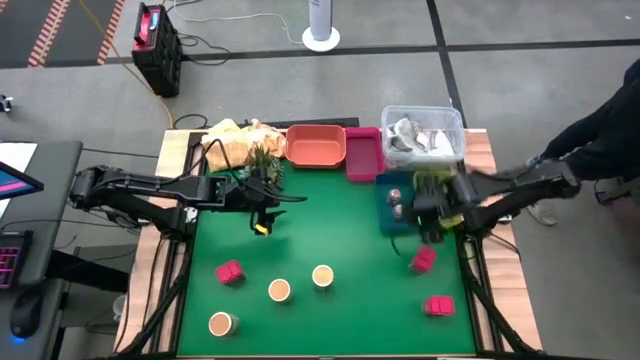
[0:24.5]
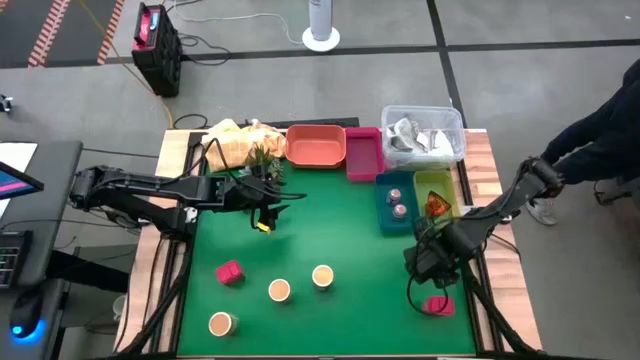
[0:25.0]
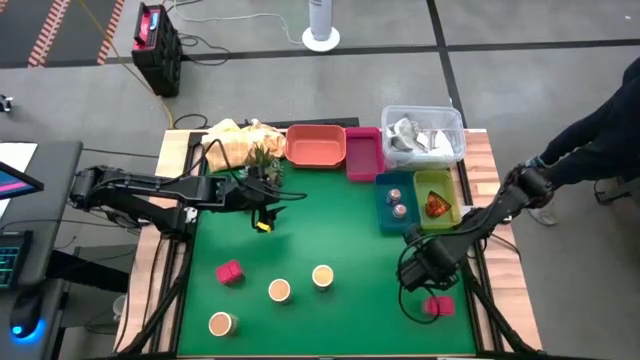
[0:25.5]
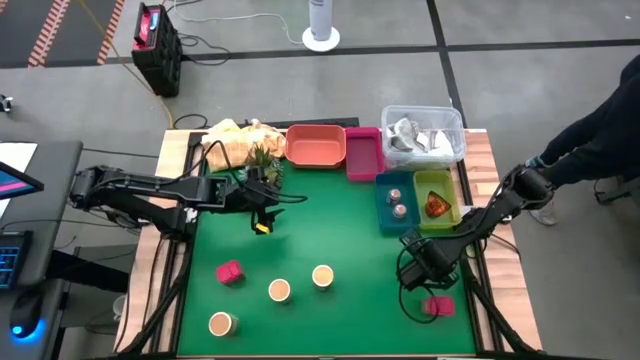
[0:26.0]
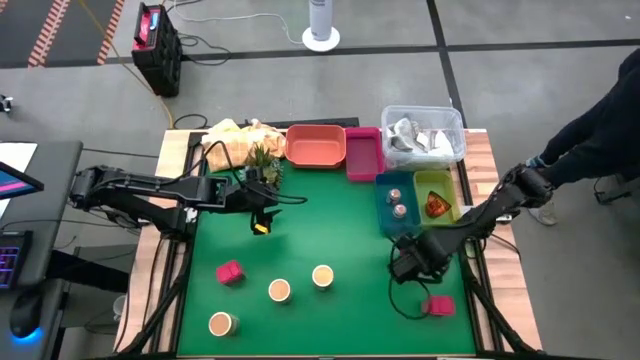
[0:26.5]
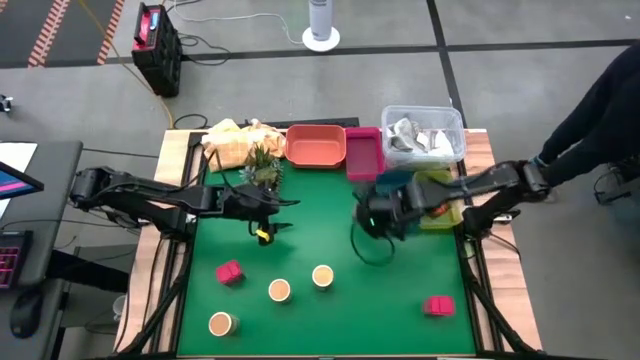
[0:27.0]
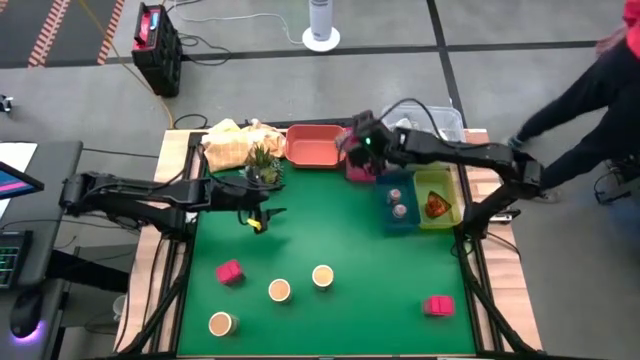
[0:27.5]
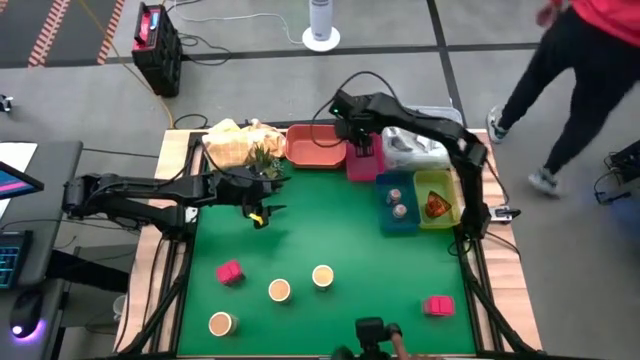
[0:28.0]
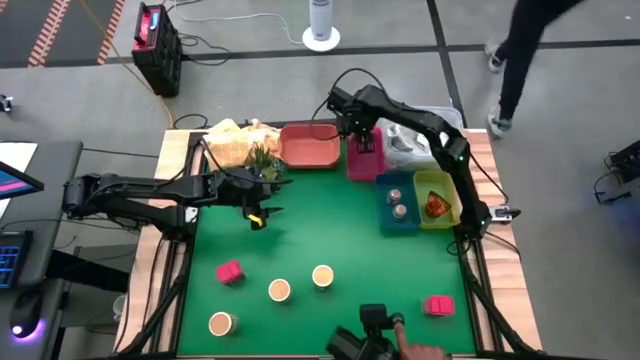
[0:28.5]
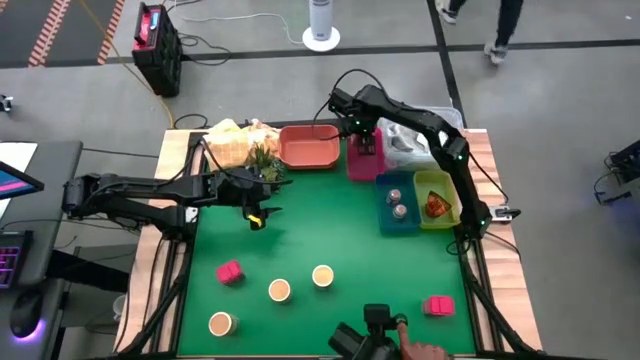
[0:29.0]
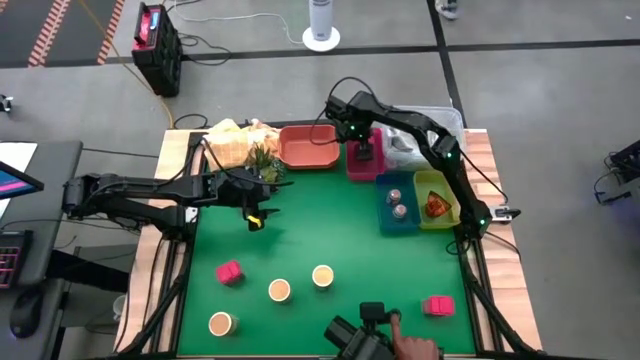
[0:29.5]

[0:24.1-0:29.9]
Task: Sort spices by type
Put the red seasoning can into the pink bin

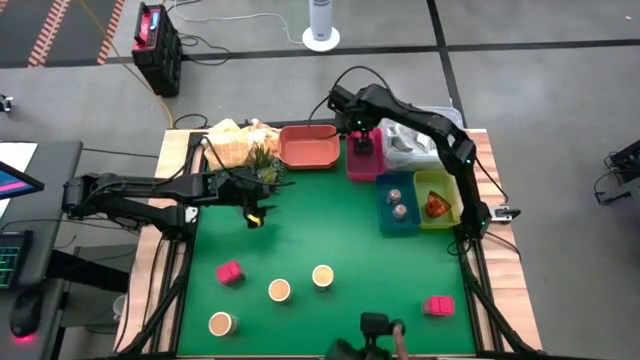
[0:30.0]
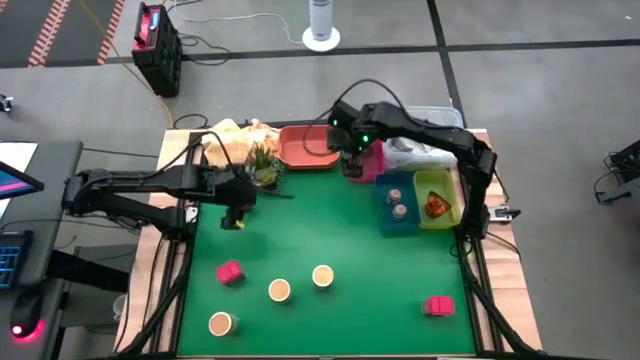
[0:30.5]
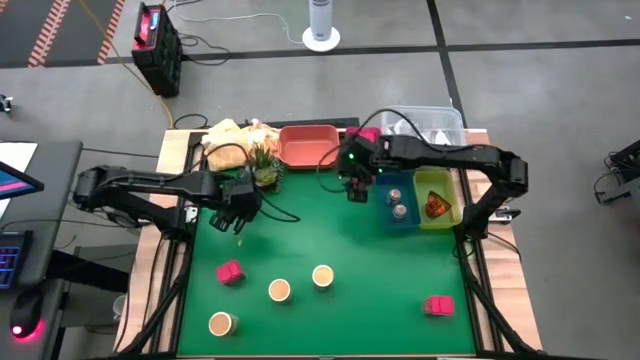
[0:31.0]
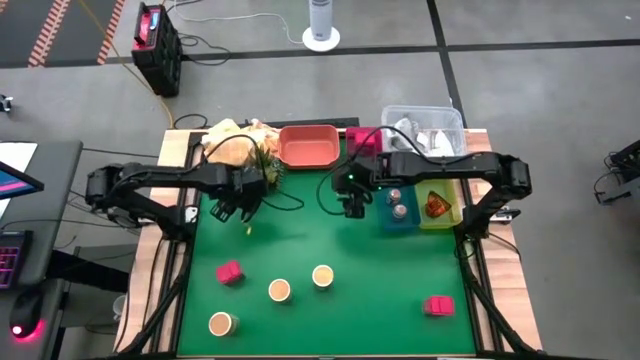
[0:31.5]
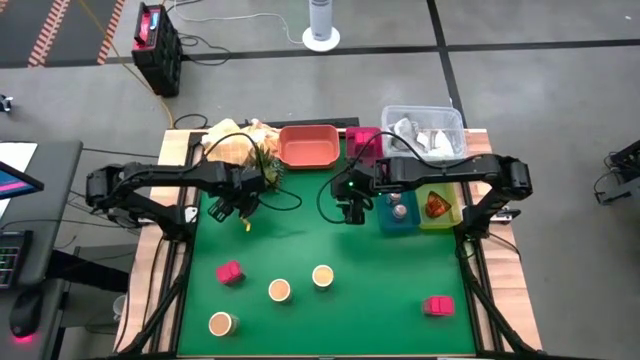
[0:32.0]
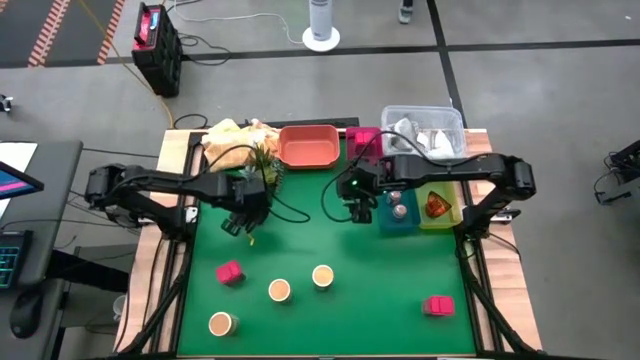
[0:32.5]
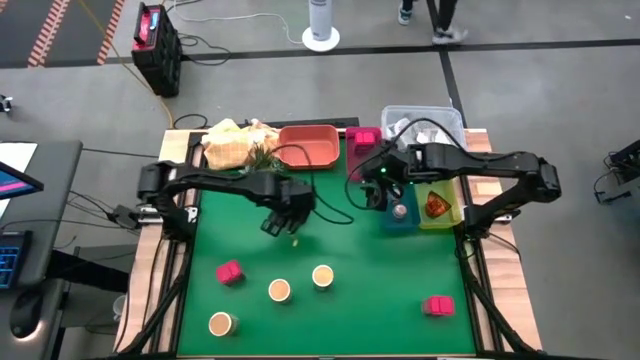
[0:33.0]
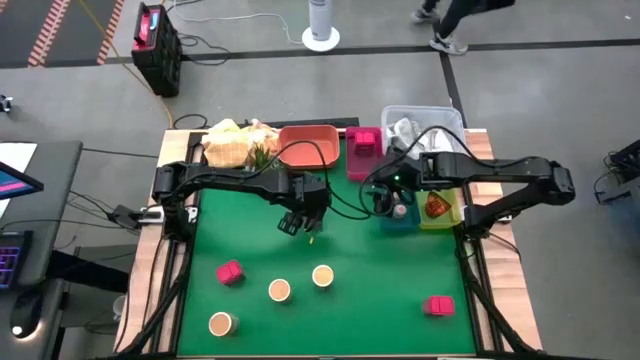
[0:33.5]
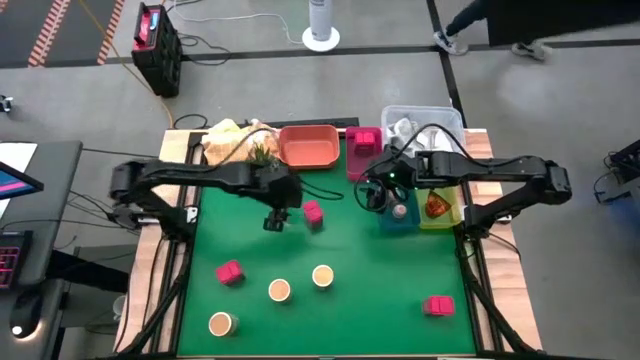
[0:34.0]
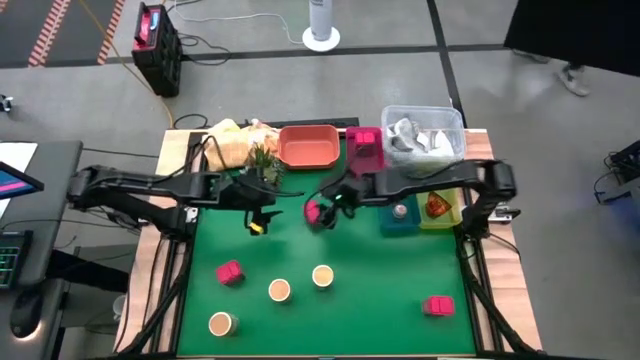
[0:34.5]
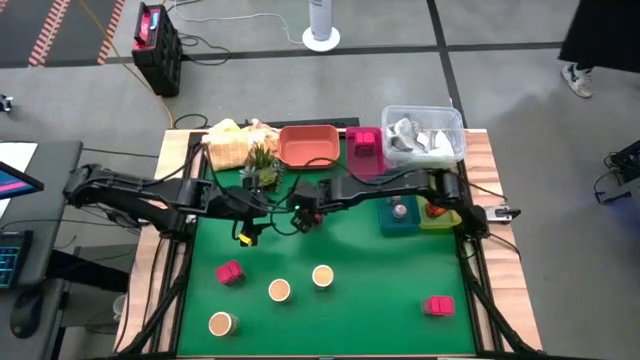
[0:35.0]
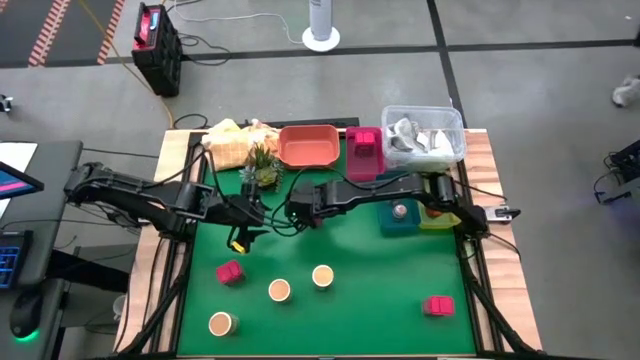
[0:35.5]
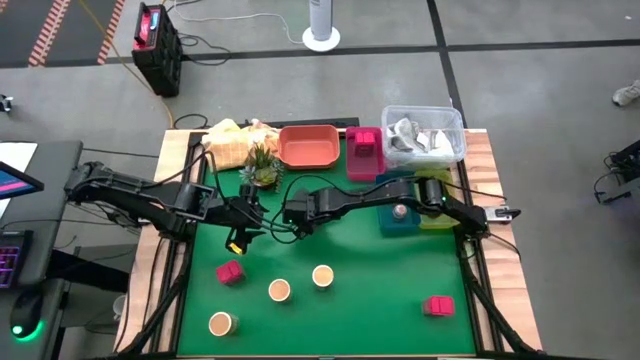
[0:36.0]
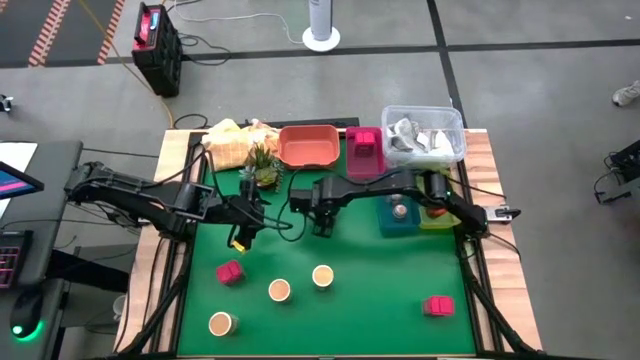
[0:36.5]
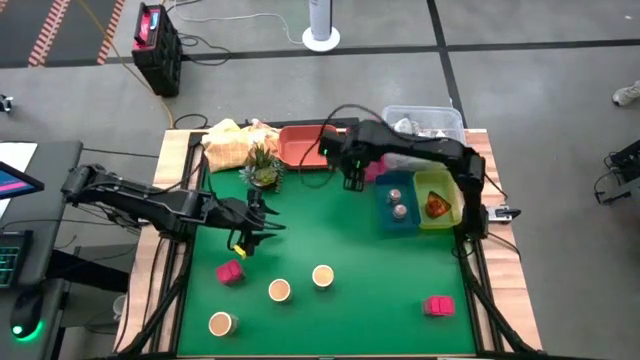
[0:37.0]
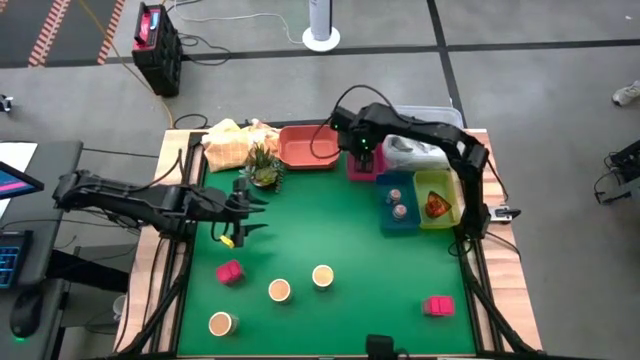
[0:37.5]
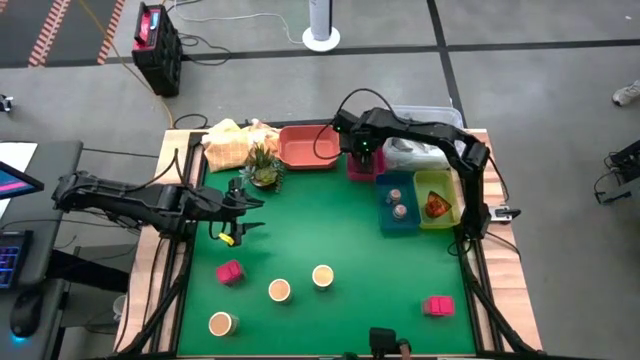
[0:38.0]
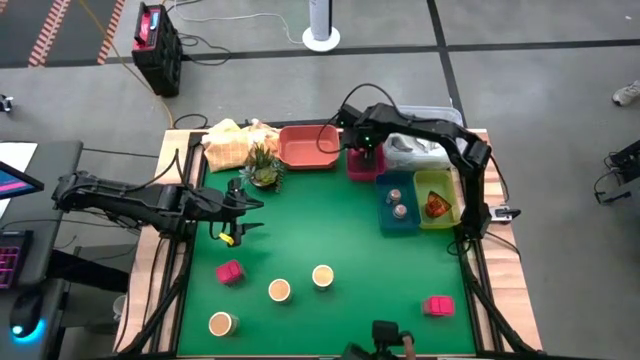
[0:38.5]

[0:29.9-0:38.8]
Put the red seasoning can into the pink bin

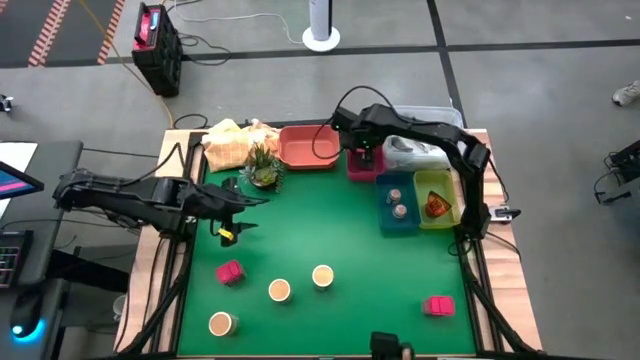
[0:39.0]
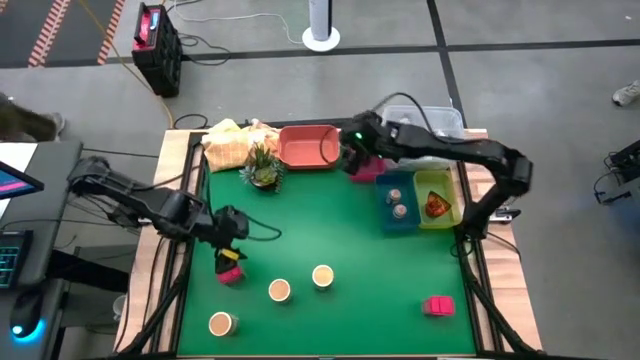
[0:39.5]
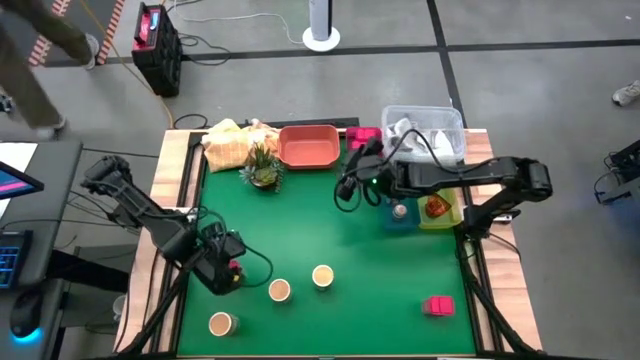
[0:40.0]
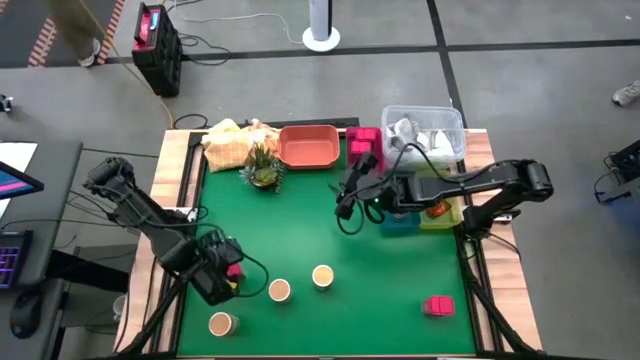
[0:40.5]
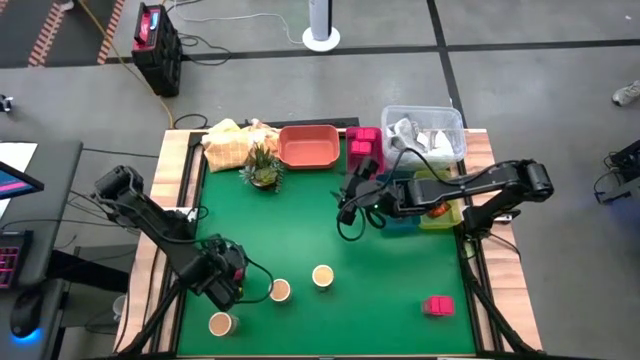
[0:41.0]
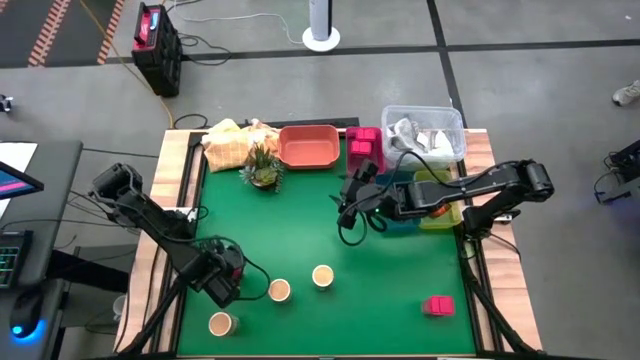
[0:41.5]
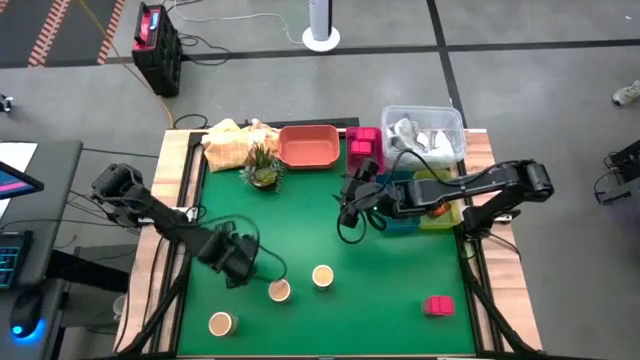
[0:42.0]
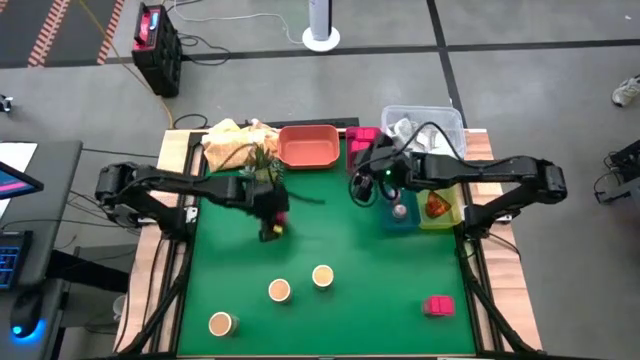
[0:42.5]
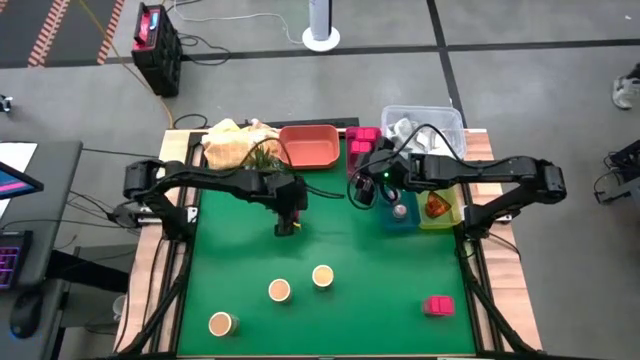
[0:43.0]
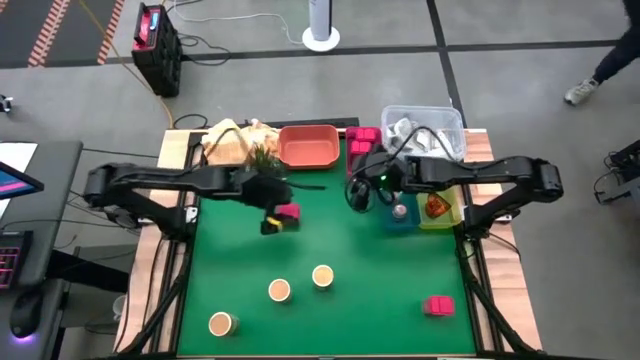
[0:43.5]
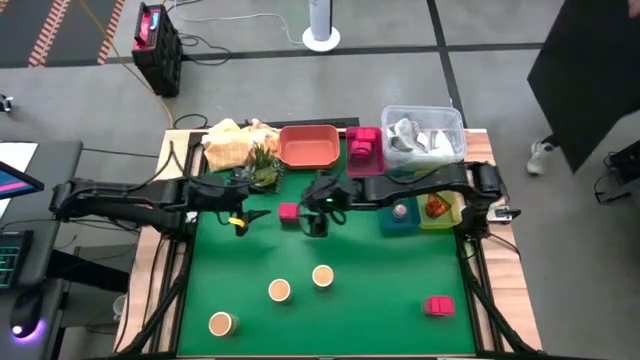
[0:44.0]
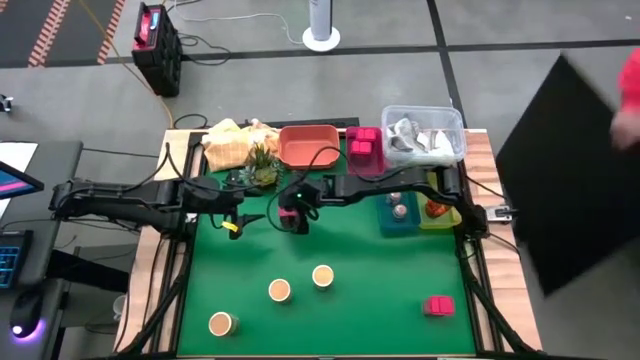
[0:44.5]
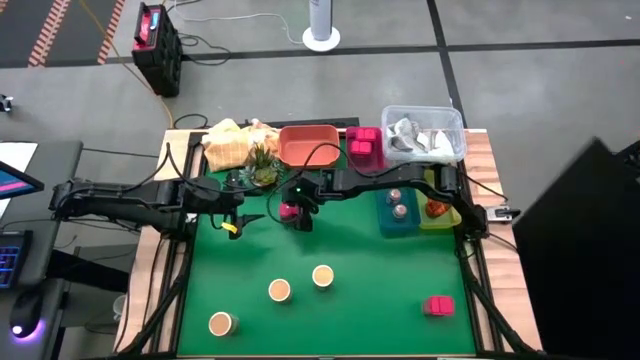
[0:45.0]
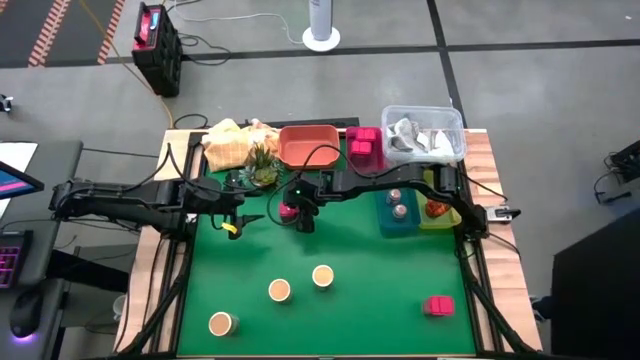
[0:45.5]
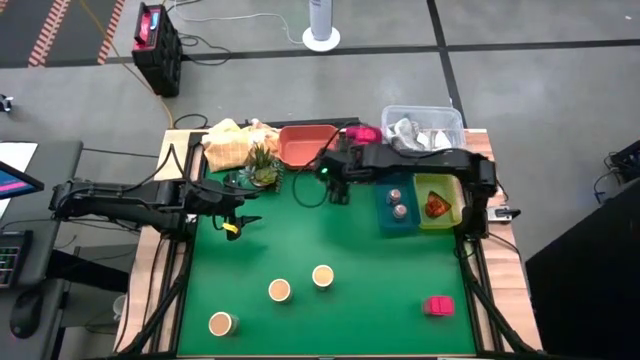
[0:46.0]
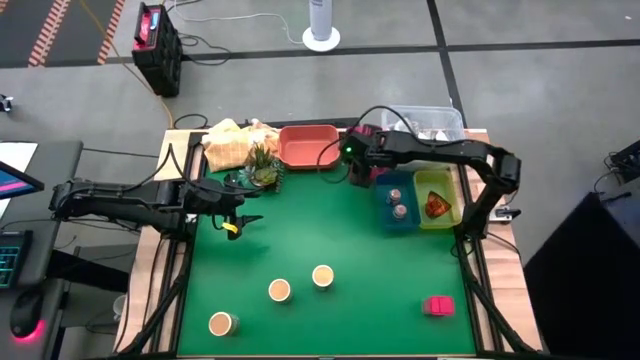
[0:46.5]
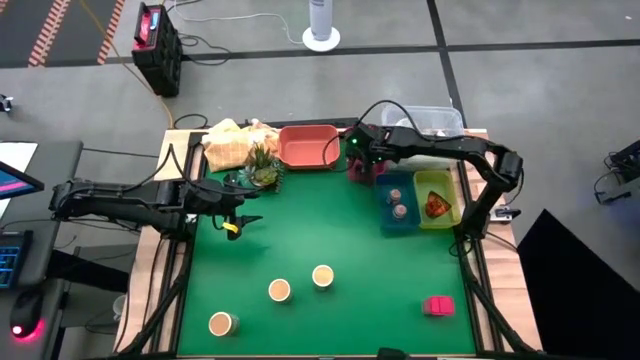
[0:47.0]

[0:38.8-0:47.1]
Put the red seasoning can into the pink bin
